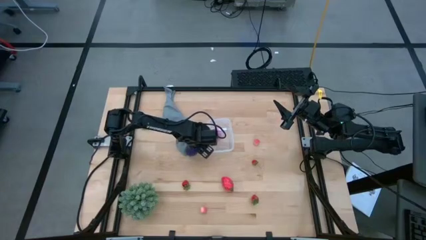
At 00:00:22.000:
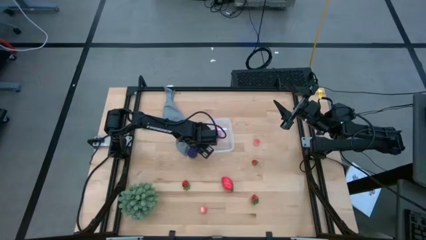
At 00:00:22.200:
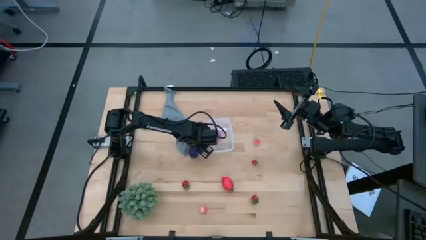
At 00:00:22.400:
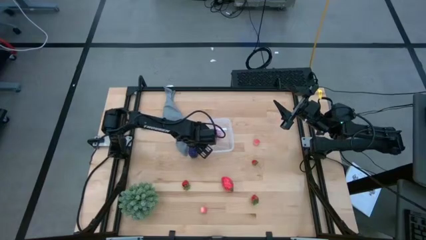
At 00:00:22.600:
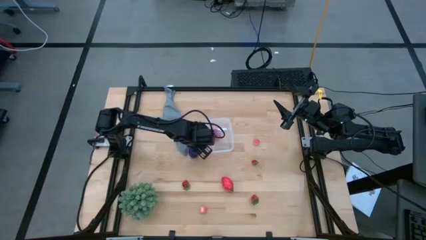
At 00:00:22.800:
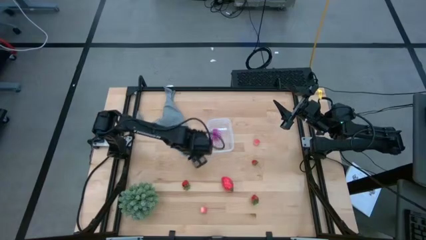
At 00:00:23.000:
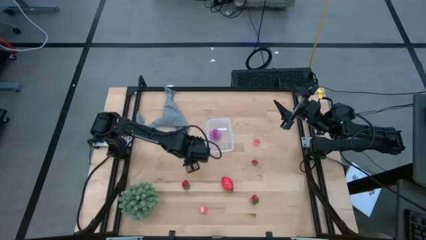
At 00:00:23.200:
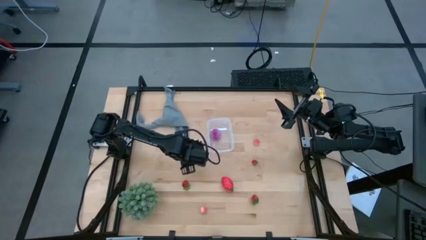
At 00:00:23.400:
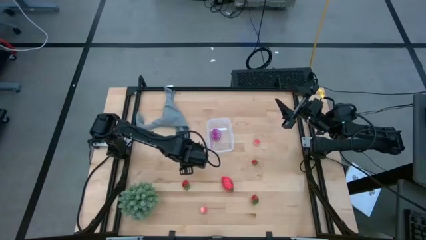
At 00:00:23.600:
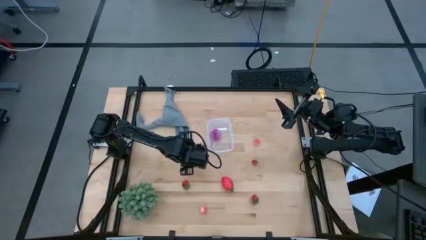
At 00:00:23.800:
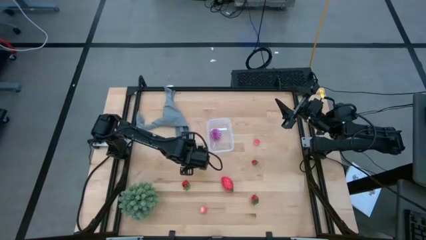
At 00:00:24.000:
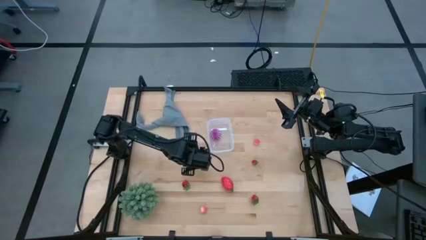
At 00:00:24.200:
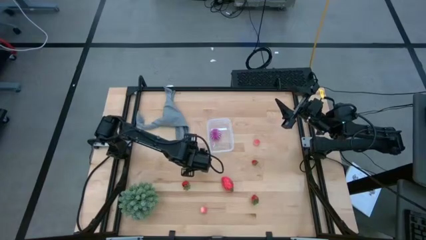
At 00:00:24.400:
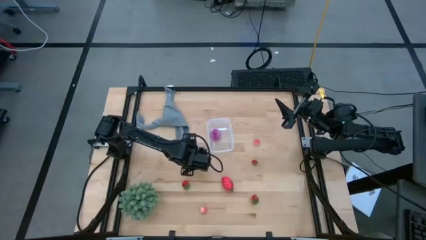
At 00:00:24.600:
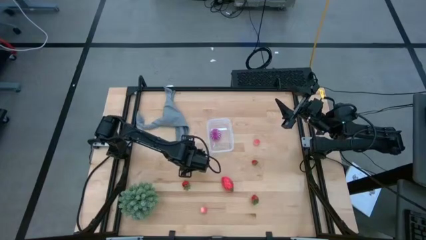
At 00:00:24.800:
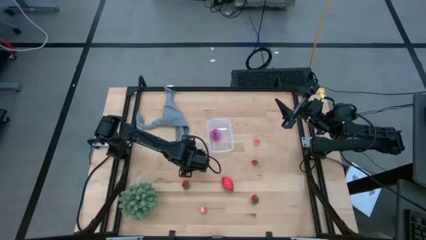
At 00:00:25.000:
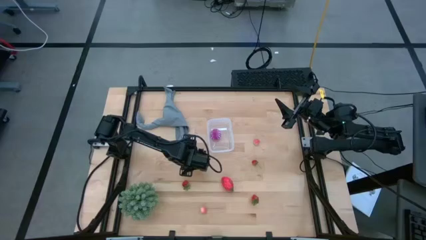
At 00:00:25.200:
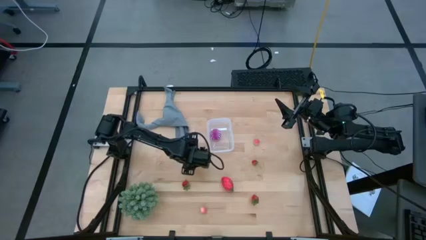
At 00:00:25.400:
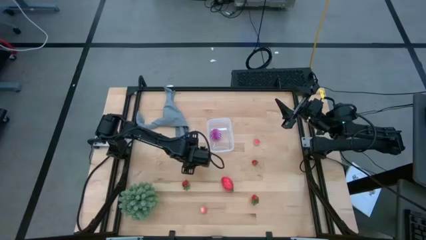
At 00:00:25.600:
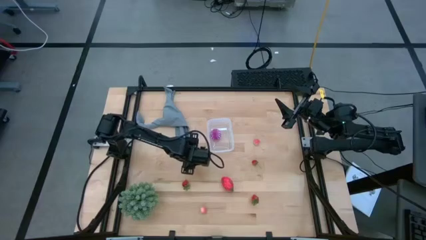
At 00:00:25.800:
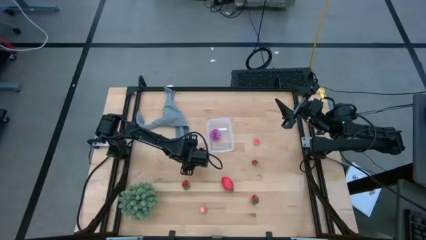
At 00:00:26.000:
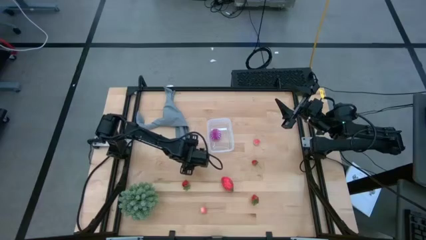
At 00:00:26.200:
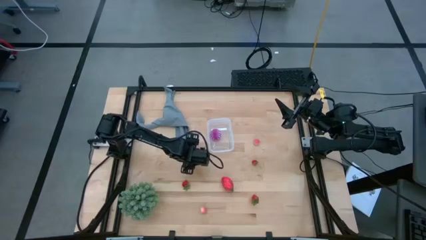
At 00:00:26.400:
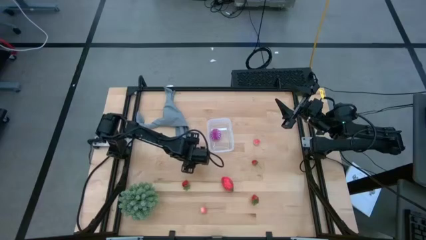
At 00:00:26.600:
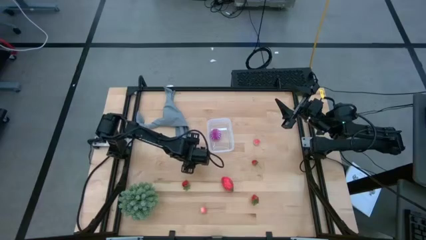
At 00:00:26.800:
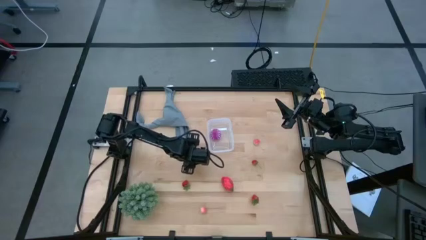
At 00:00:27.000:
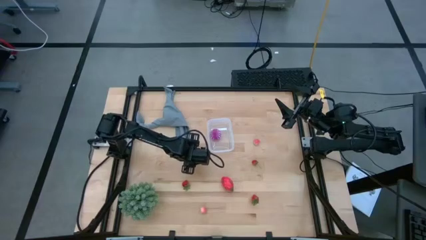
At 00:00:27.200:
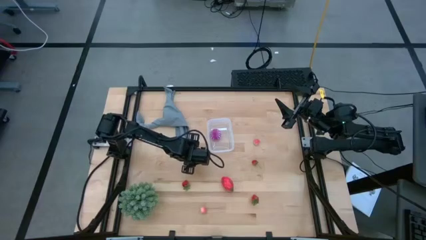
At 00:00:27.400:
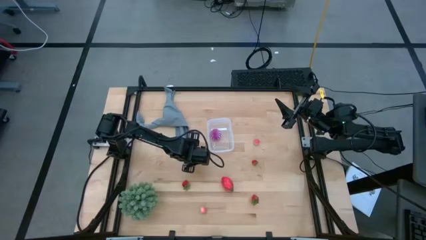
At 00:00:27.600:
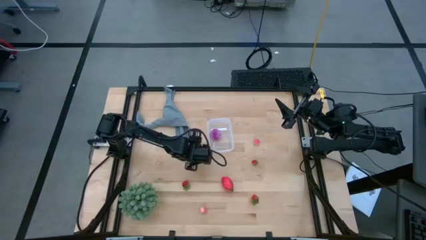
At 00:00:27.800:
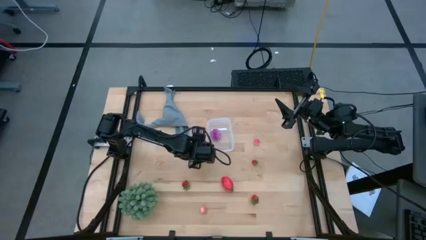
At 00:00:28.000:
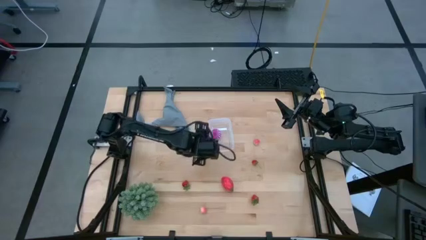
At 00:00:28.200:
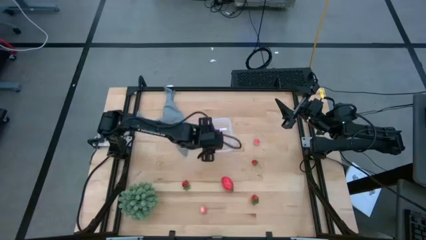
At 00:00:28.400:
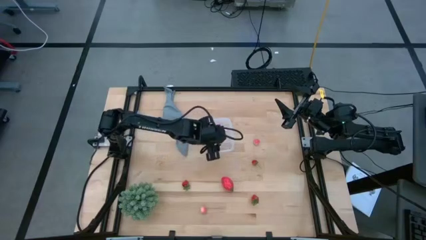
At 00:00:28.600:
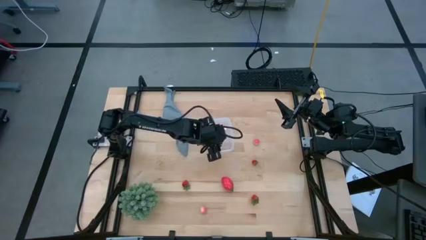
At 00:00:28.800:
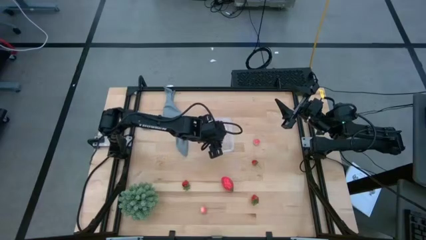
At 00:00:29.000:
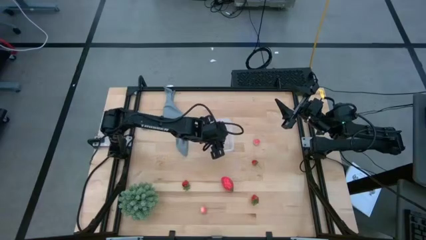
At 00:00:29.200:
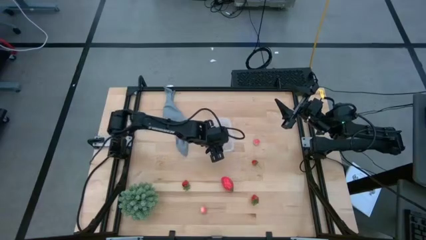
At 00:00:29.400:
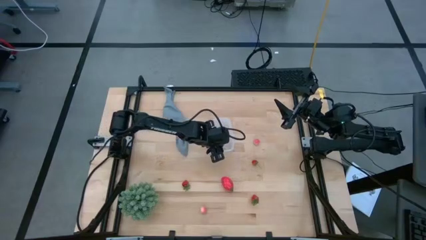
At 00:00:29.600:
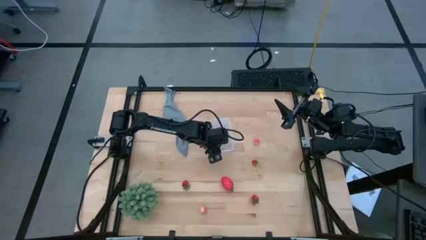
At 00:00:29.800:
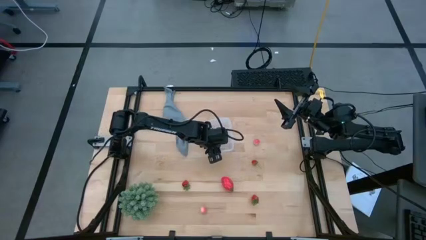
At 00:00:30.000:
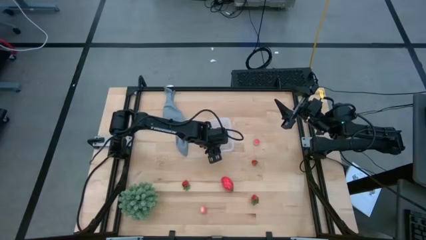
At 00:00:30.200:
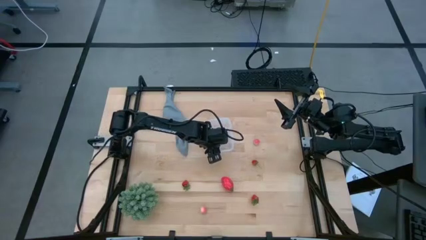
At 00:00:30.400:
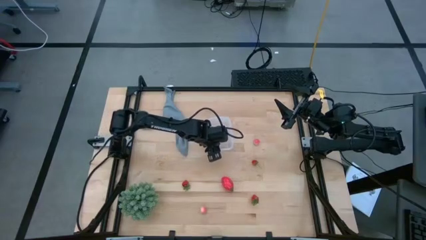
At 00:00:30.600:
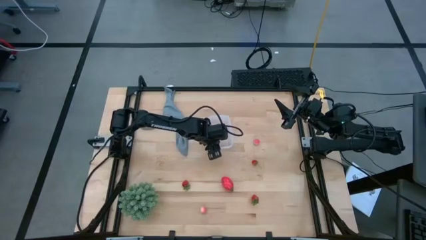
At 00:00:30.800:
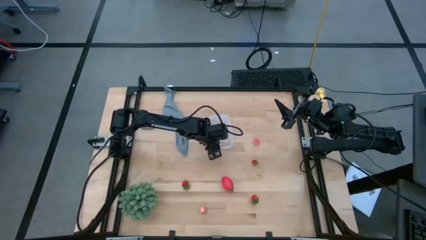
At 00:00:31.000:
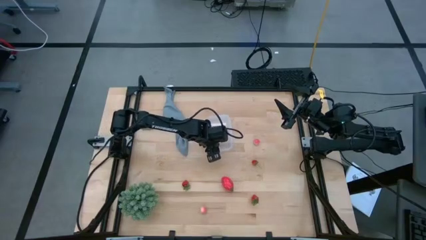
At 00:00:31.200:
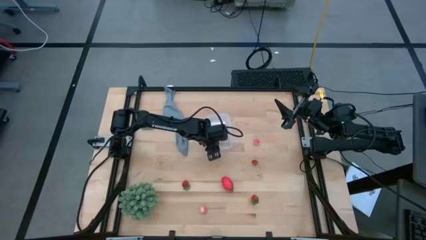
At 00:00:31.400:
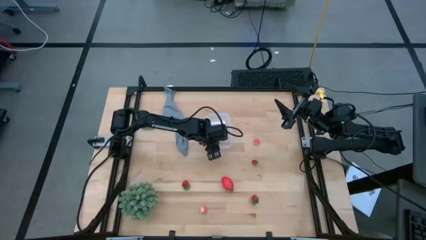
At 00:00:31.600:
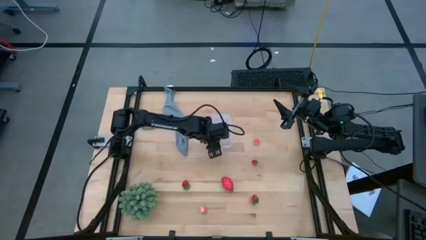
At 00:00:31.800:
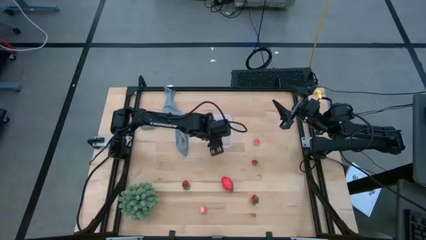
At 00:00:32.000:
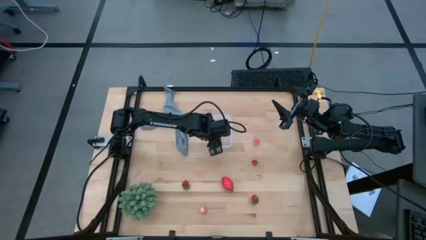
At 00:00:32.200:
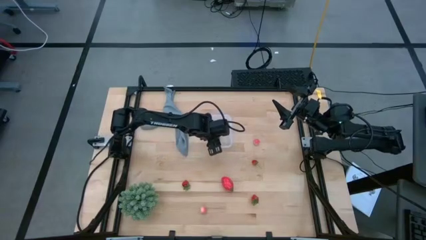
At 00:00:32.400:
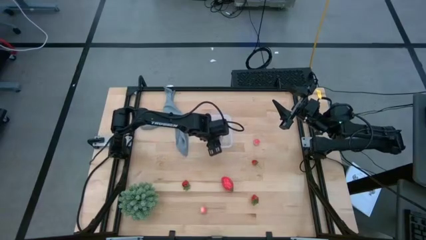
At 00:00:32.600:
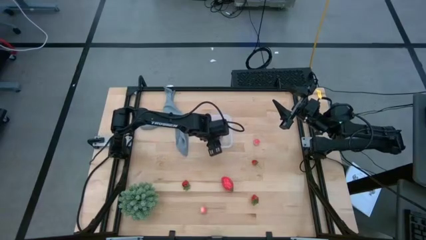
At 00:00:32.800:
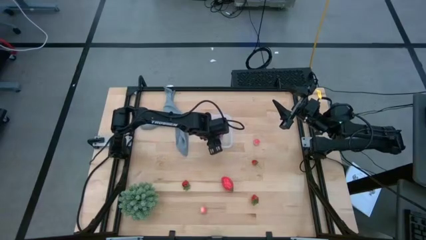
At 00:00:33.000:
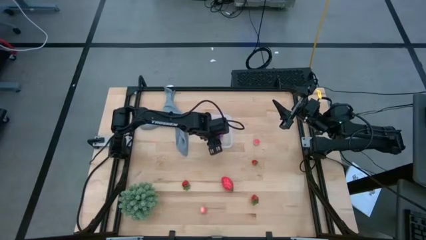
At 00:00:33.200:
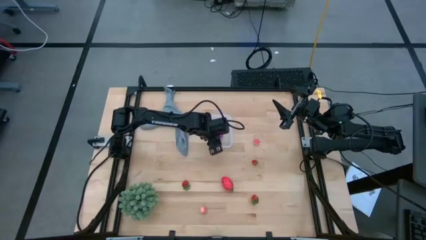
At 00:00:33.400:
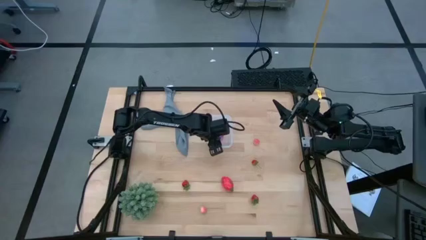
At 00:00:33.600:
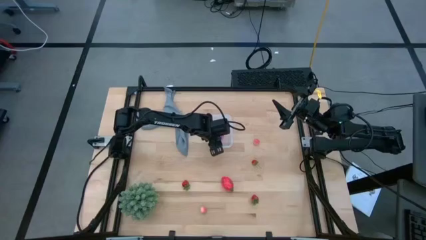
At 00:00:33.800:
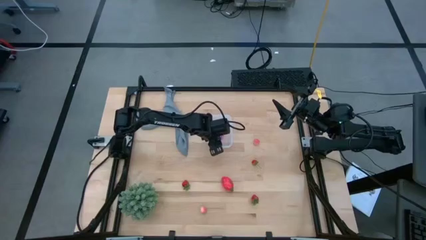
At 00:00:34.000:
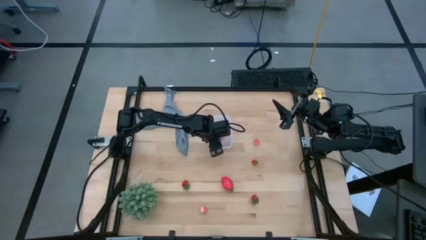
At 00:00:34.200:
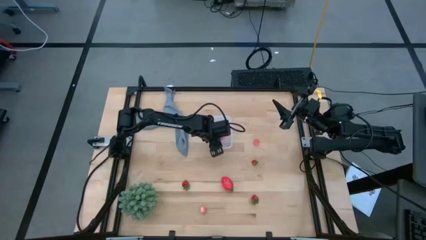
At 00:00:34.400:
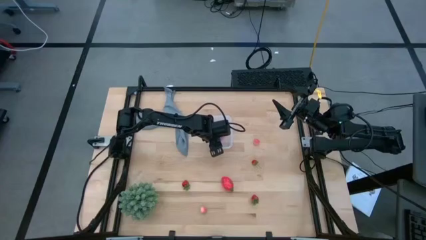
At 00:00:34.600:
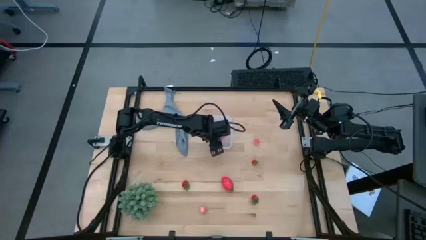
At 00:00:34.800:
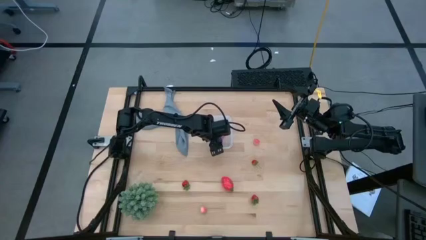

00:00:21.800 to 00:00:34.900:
Task: Pick and placing Produce into tupperware
Put the purple grapes into the transparent bin
